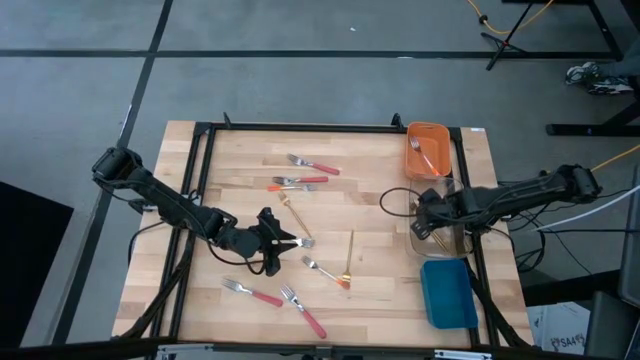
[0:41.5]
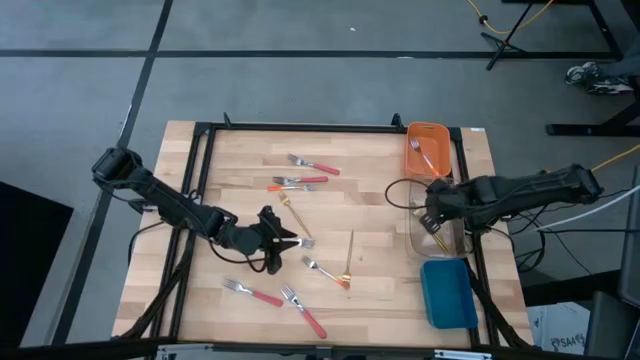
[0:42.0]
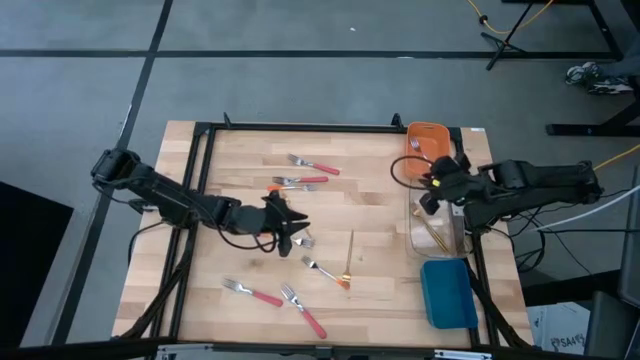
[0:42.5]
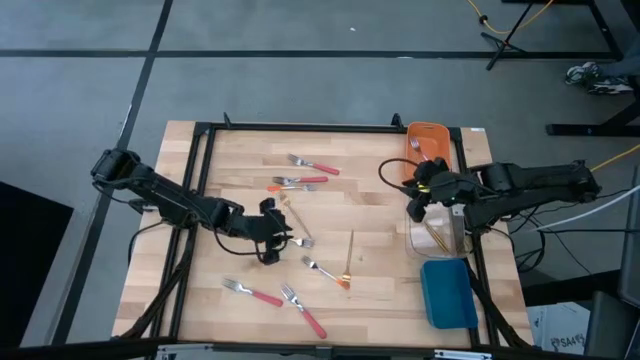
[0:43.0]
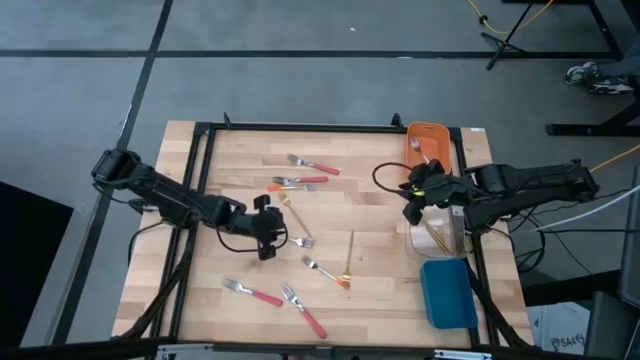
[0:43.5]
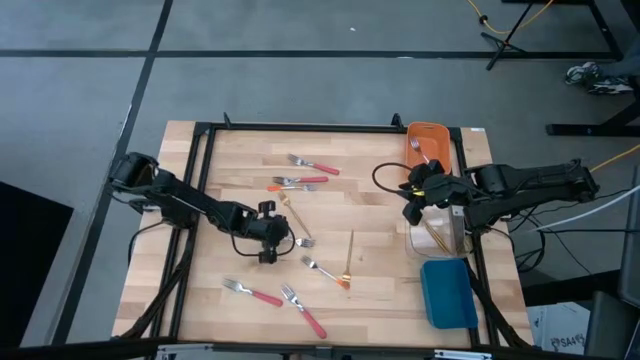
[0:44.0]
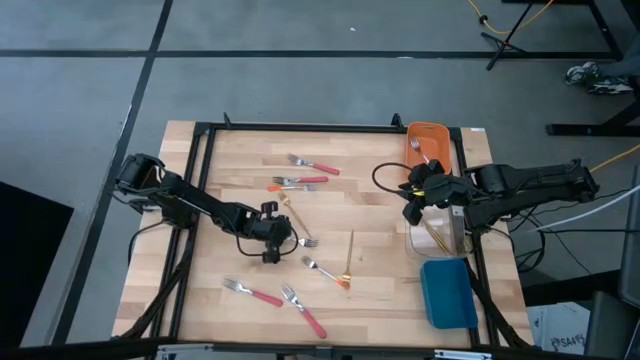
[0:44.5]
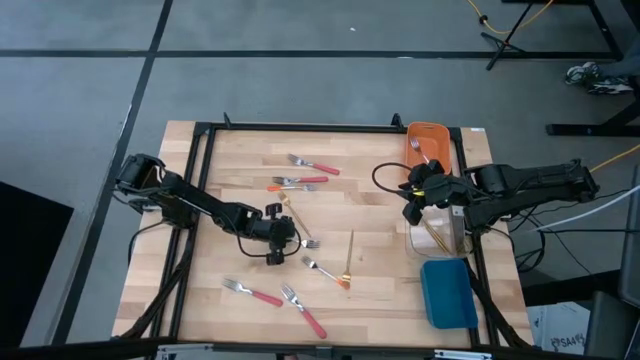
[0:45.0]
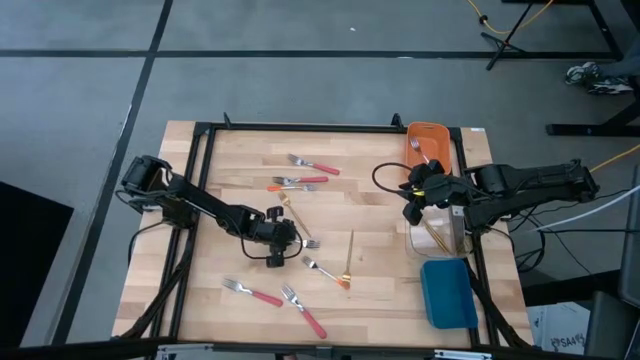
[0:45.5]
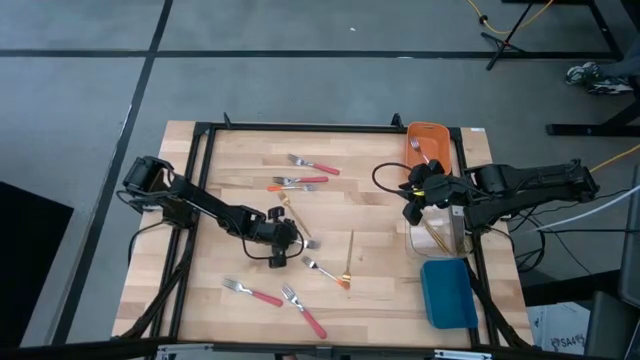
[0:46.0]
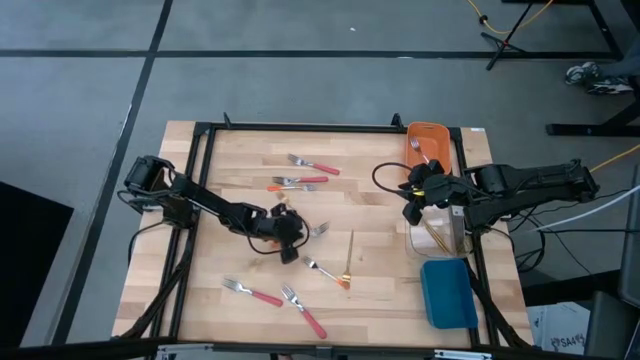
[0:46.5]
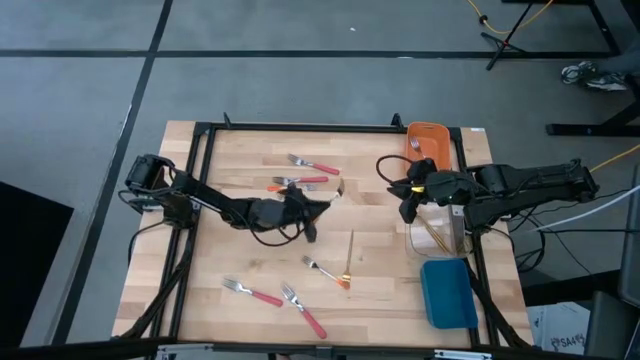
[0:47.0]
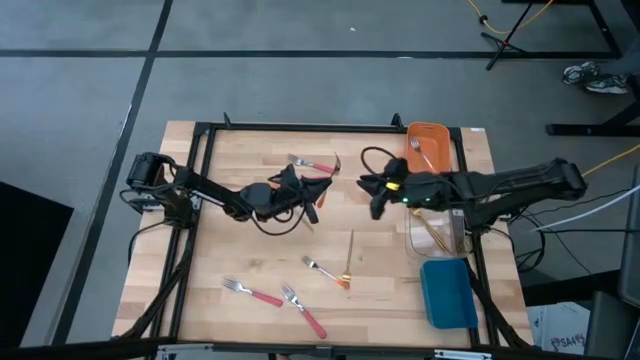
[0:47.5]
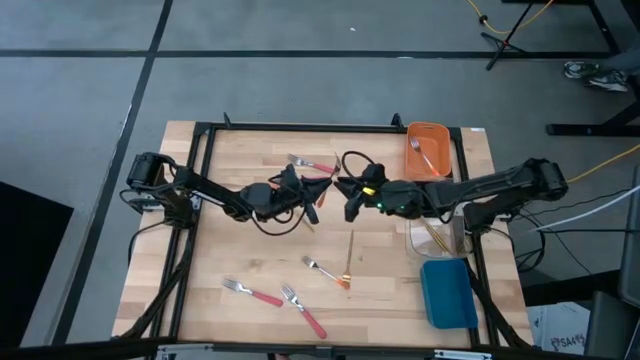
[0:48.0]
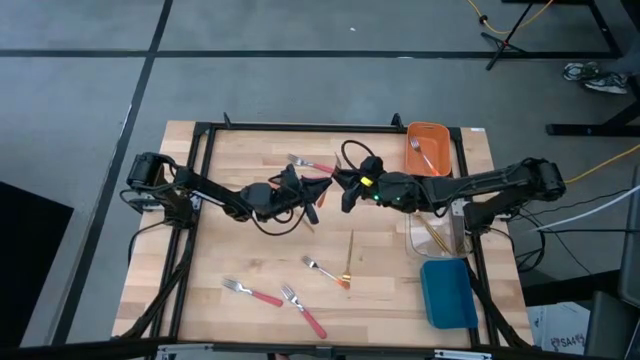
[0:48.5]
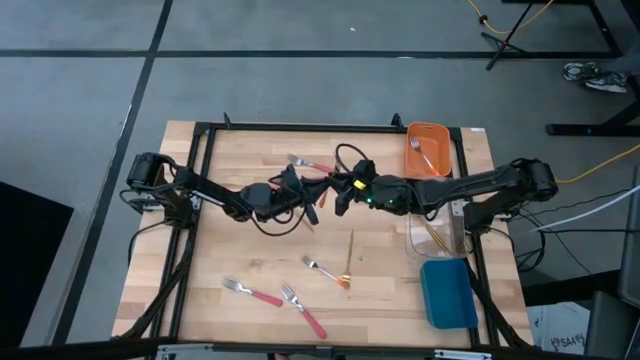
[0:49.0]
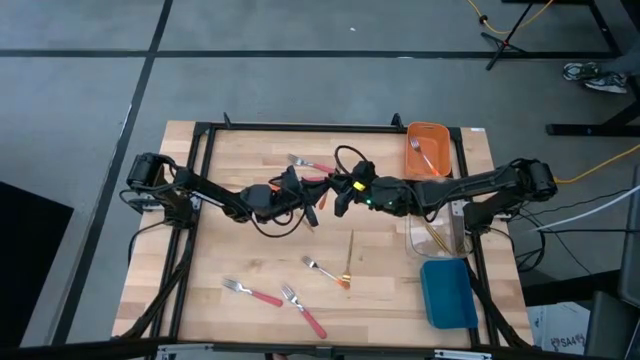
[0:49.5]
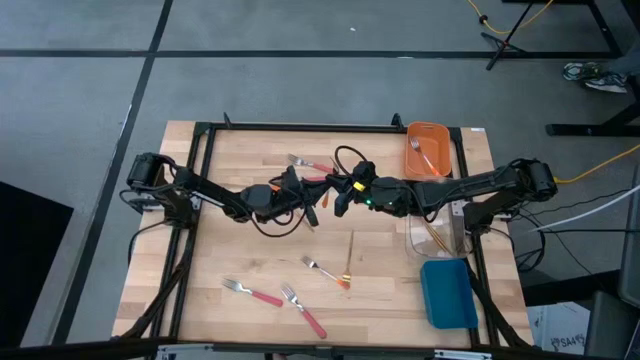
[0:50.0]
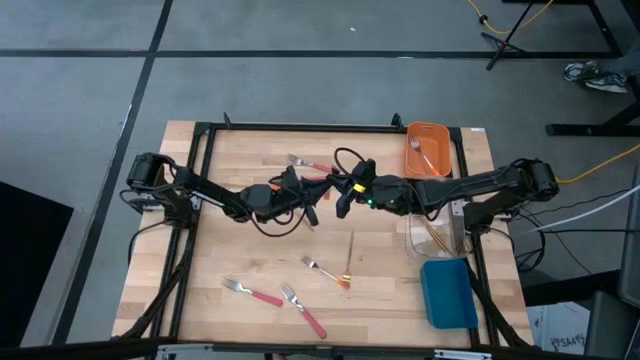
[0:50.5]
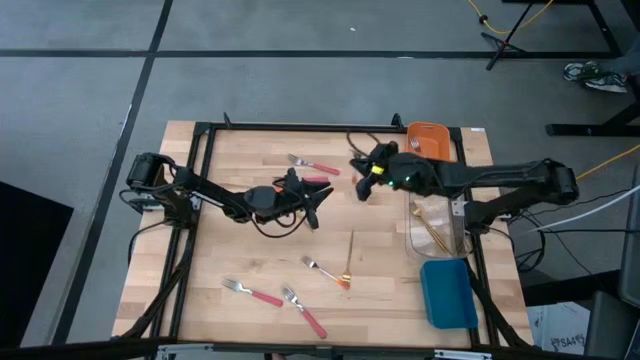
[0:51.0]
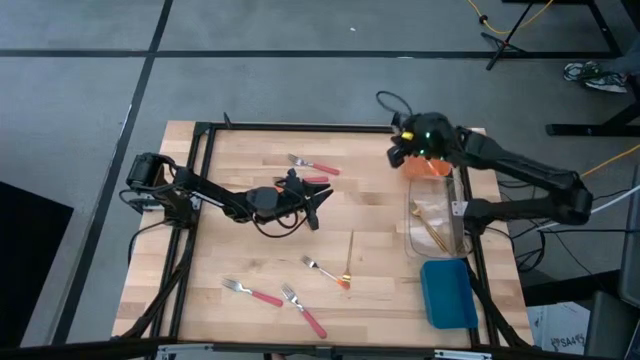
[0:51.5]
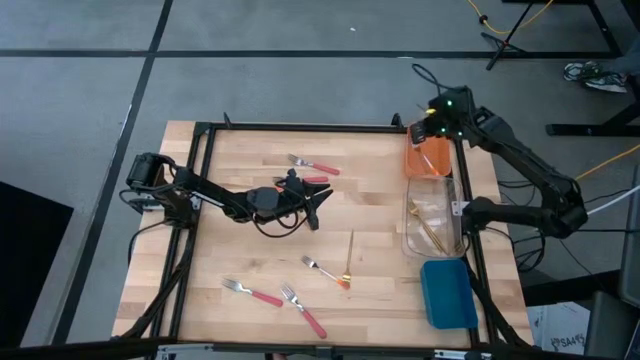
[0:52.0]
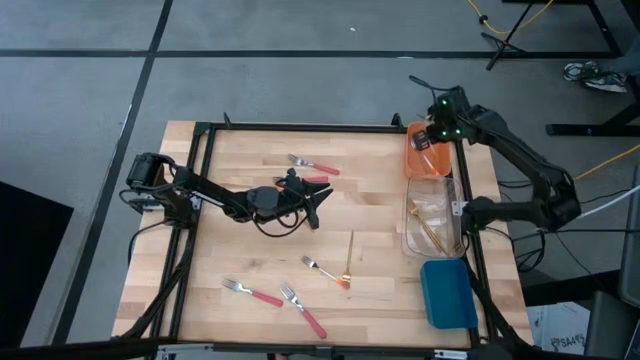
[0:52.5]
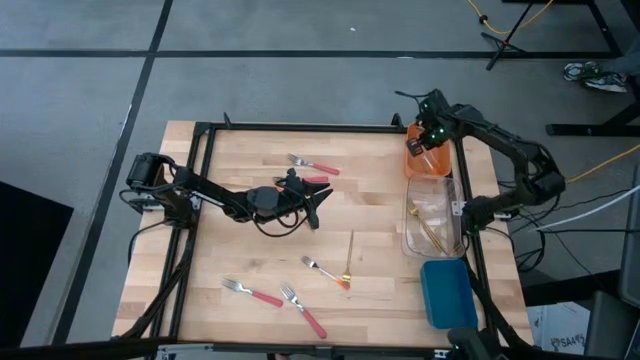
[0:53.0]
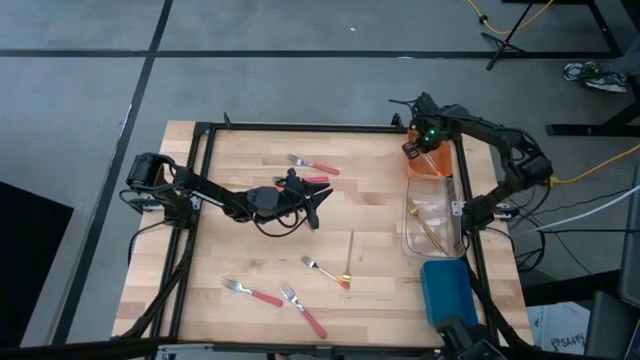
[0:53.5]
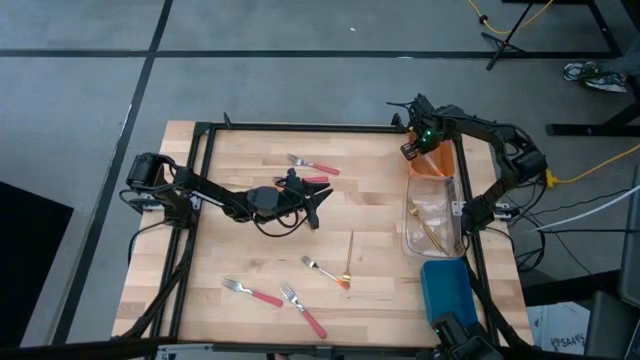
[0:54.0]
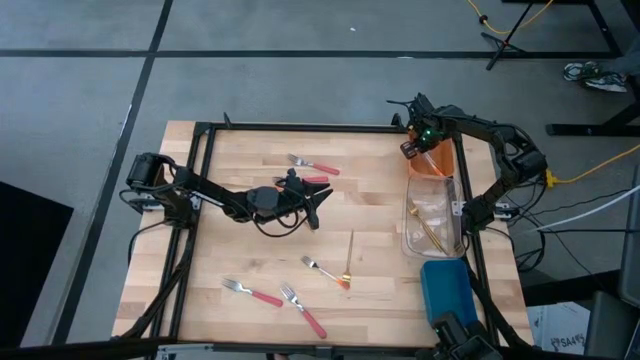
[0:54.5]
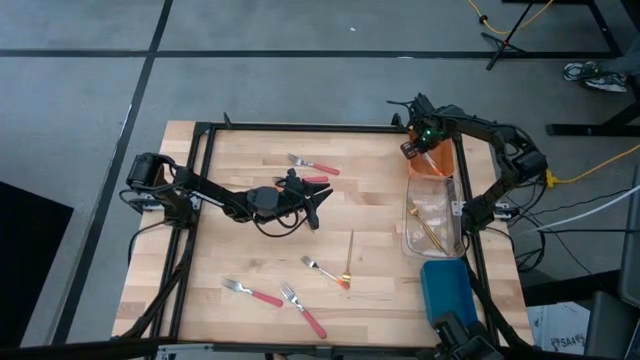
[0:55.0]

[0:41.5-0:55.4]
Task: Sort silverware by color (type)
Put the orange fork into the orange bin
